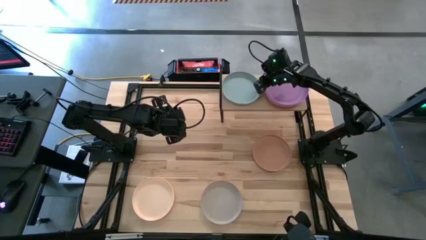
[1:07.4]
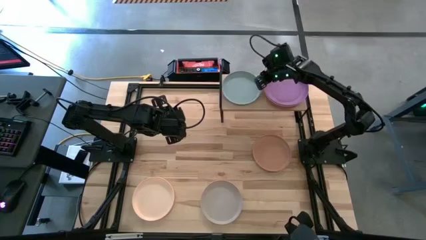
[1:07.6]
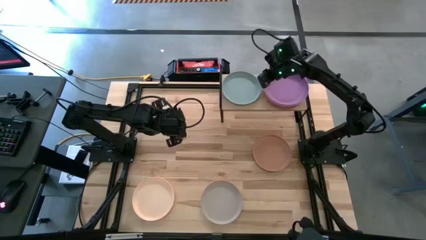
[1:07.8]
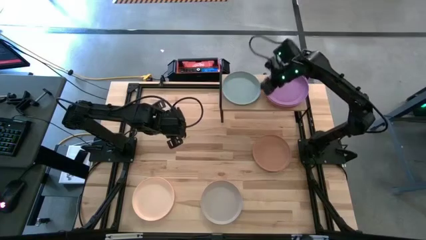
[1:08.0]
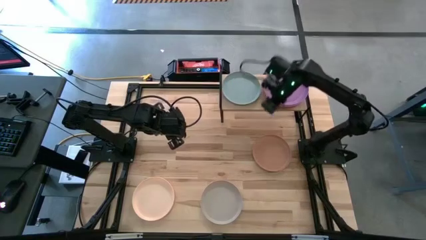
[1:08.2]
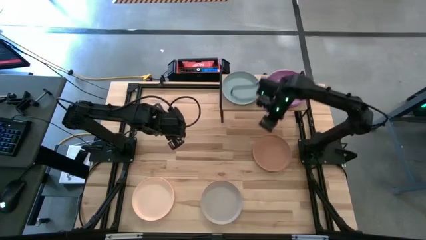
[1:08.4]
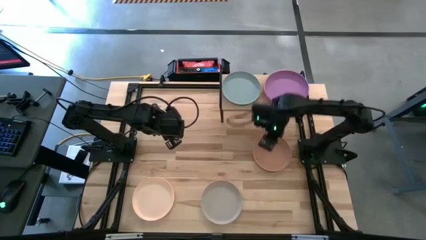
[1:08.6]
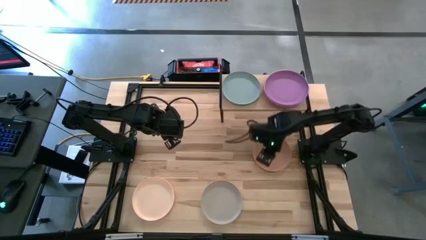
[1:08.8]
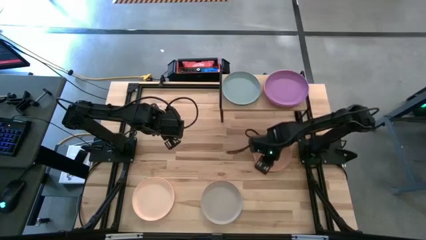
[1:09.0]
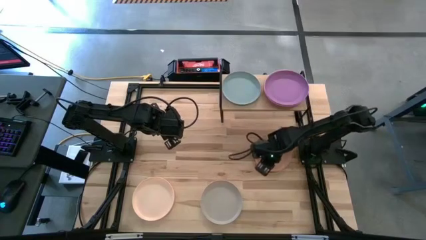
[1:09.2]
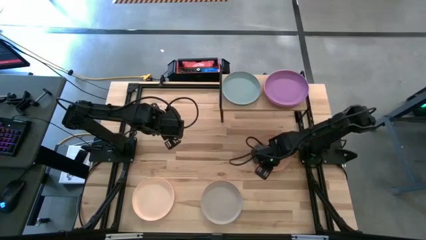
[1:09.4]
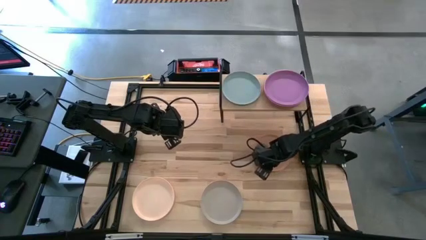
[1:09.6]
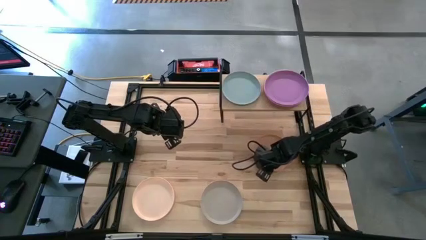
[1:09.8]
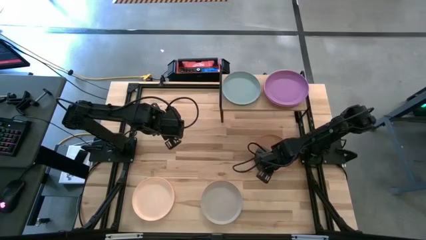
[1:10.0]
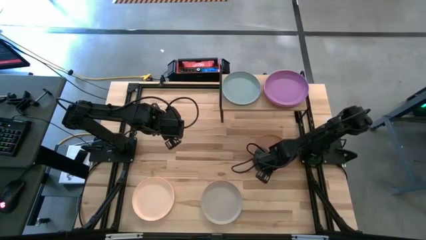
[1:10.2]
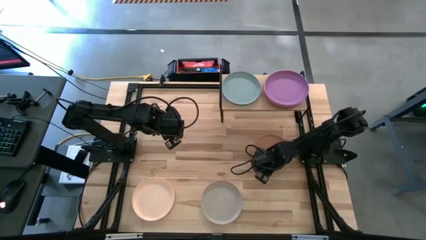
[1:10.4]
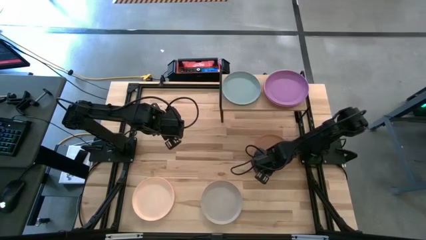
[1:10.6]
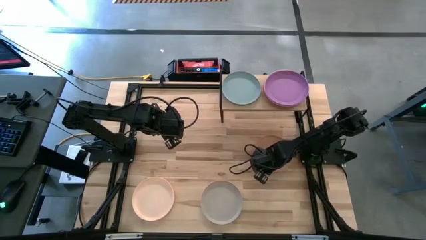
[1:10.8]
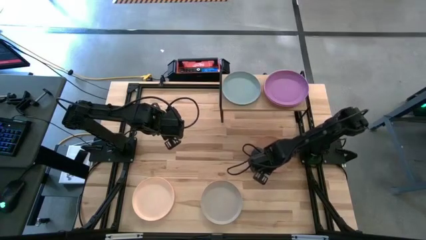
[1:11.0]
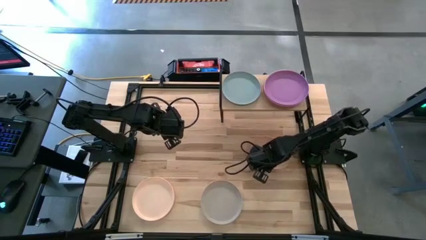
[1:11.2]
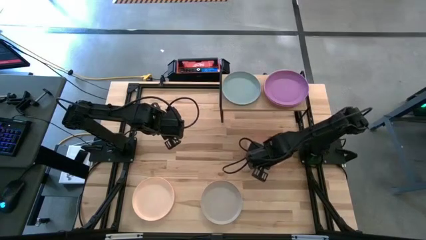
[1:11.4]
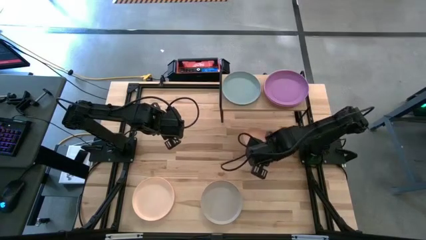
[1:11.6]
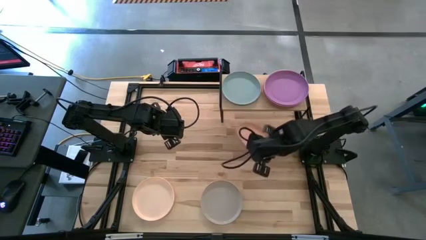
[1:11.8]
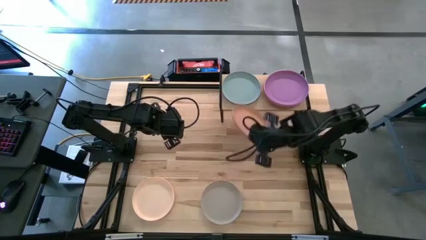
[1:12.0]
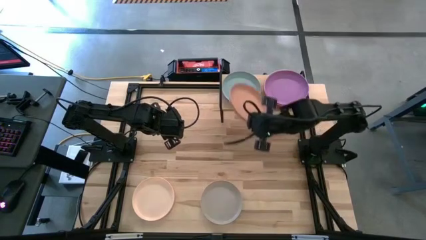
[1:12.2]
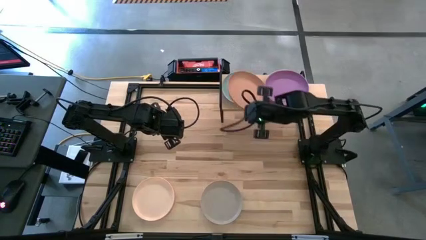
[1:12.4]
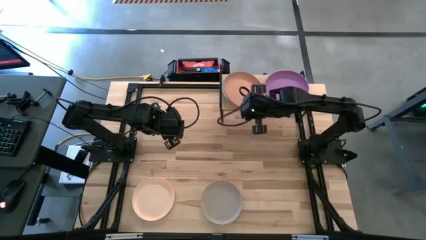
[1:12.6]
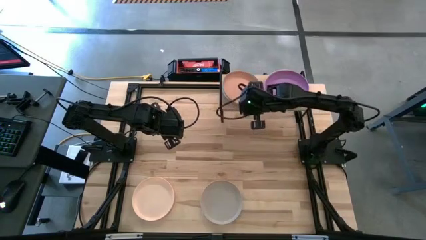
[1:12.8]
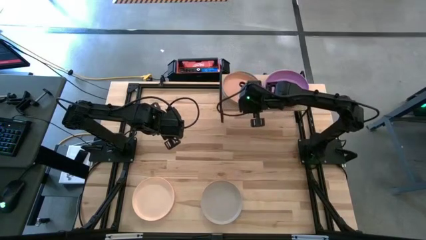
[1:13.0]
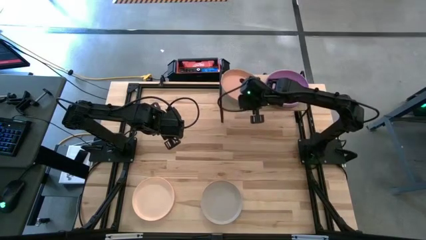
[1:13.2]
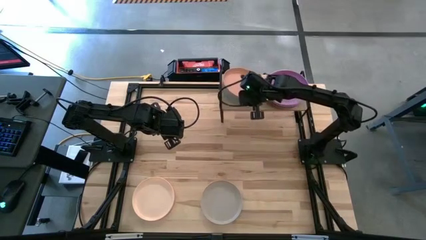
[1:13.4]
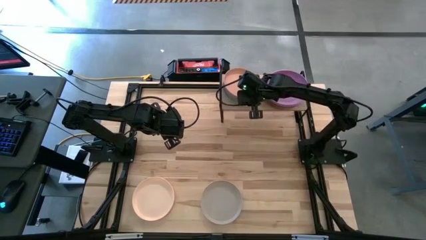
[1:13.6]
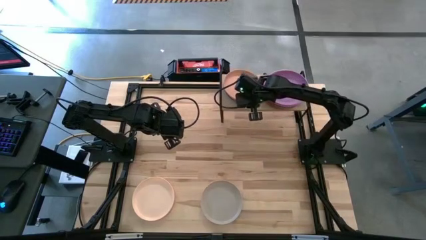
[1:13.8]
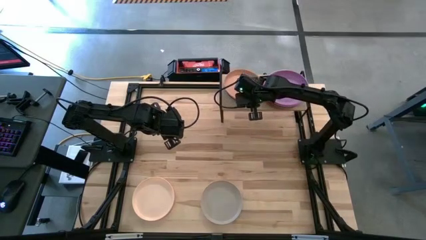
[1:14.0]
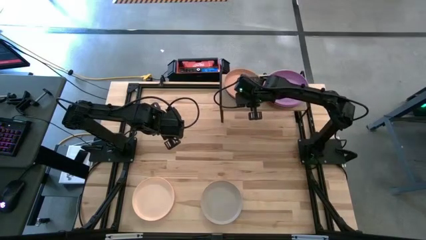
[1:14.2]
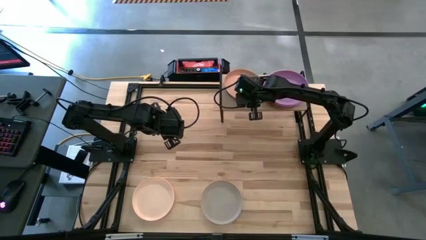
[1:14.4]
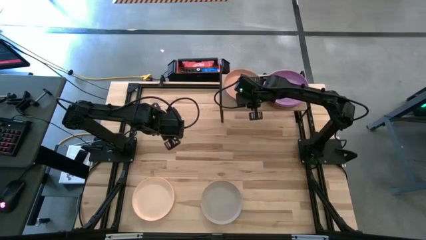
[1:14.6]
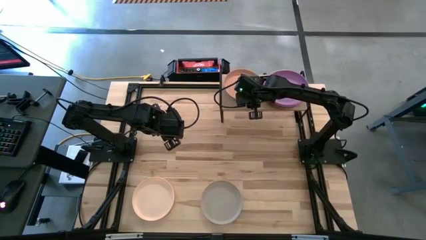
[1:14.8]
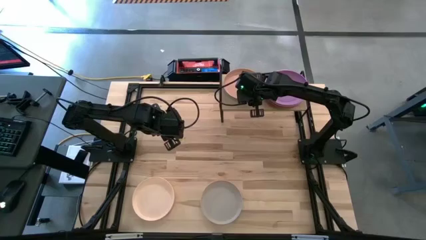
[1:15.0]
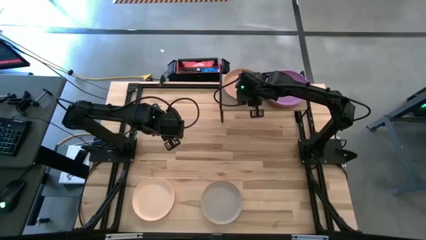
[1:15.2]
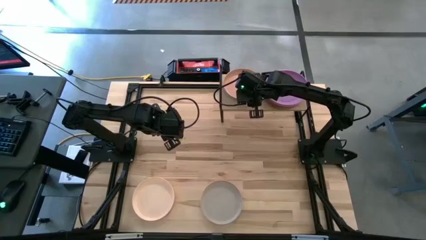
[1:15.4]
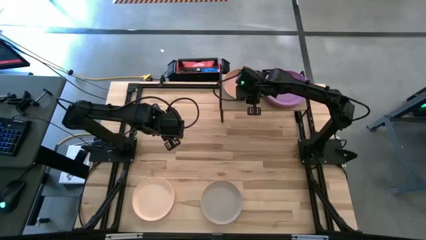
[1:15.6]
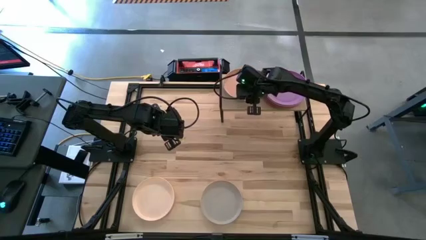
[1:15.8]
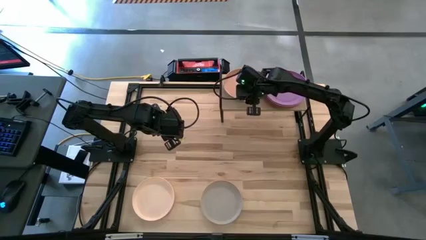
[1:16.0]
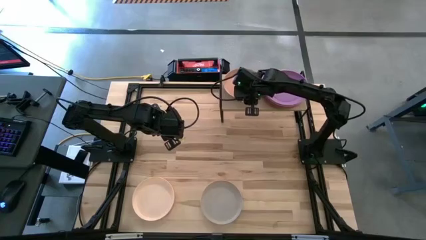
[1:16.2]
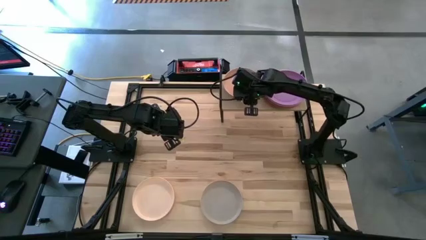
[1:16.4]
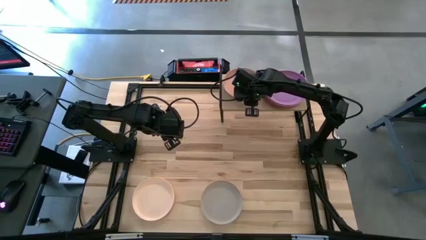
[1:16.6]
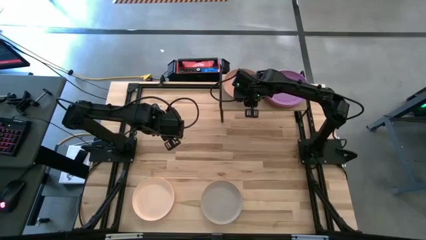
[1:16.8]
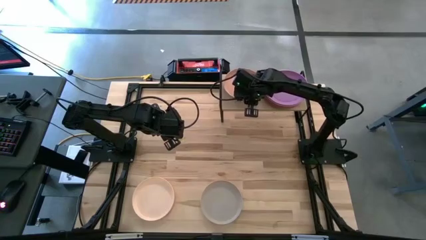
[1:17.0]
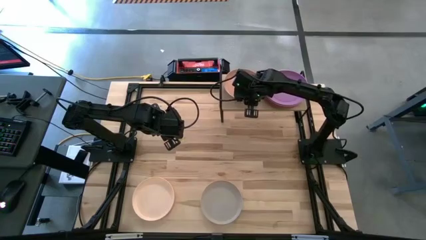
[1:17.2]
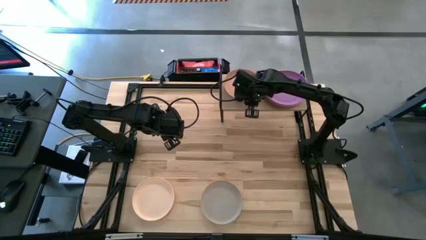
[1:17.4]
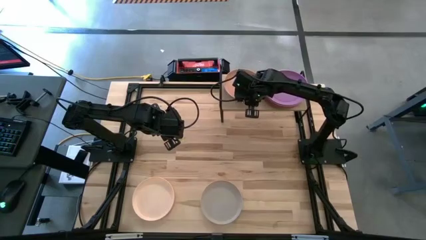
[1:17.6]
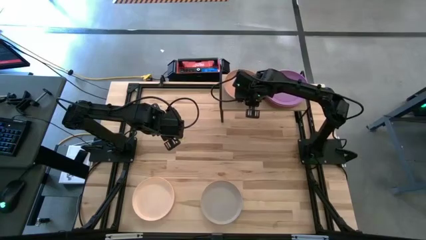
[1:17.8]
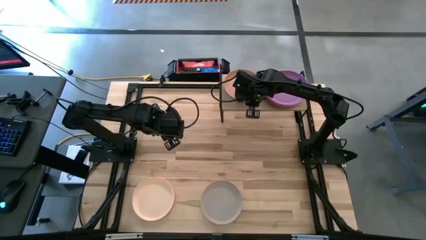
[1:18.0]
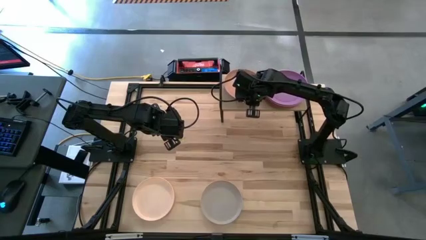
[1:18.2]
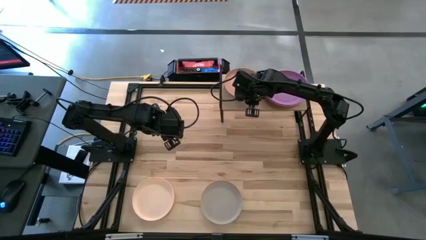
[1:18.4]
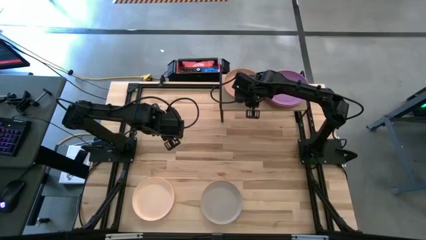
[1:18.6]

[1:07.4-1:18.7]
Task: Place and stack plates onto a shelf
Stack the light orange plate on top of the blue plate on the shelf
